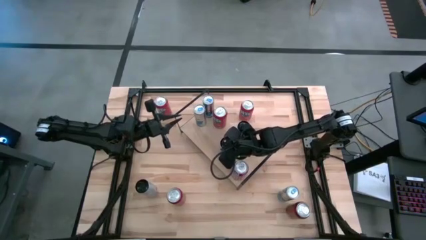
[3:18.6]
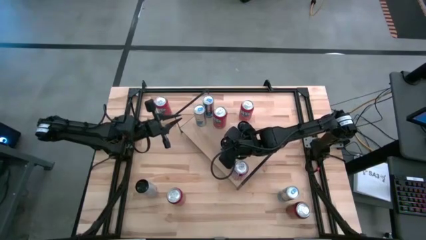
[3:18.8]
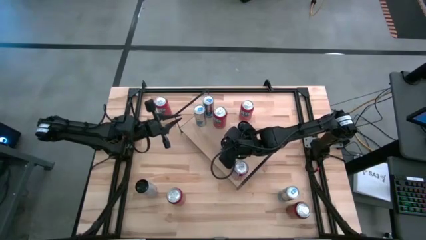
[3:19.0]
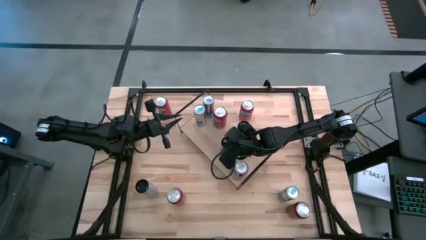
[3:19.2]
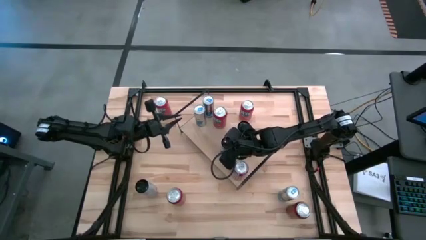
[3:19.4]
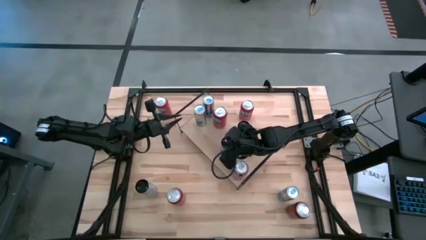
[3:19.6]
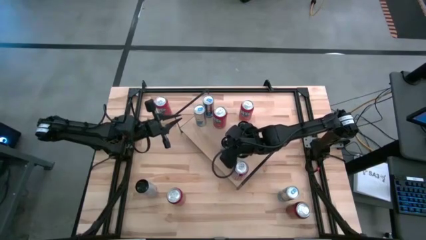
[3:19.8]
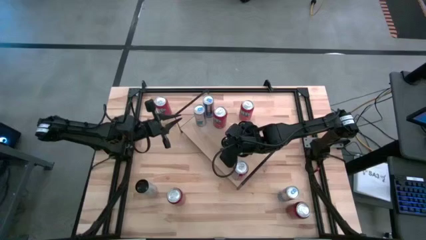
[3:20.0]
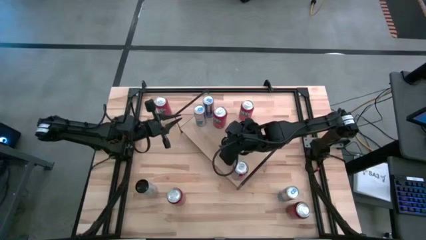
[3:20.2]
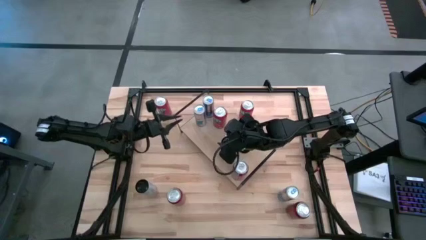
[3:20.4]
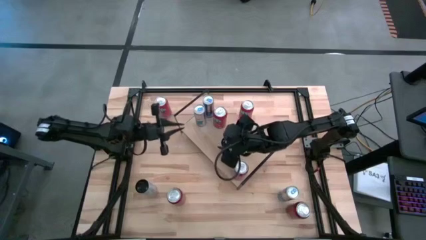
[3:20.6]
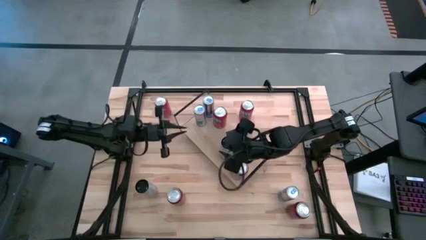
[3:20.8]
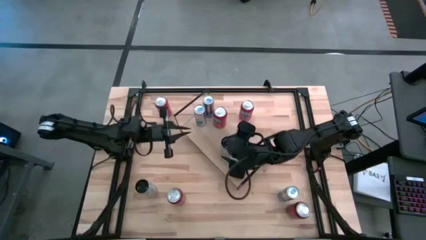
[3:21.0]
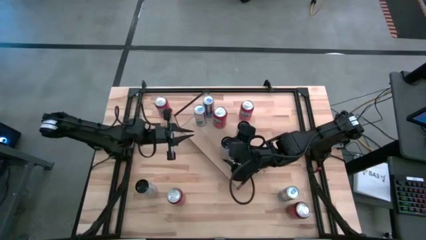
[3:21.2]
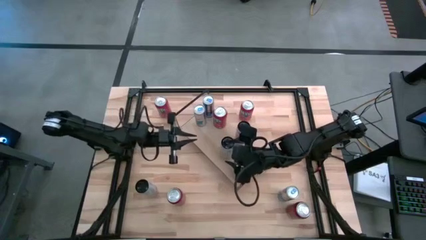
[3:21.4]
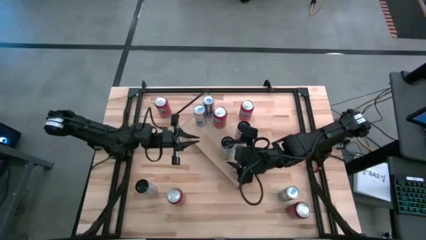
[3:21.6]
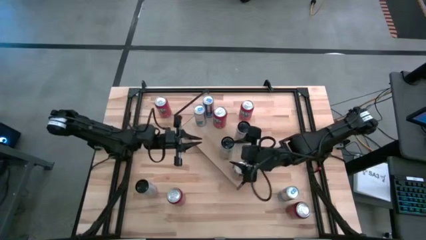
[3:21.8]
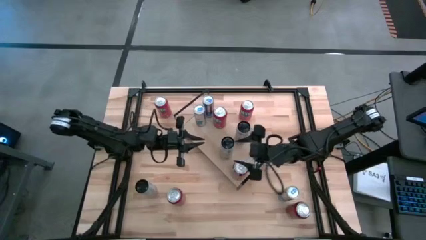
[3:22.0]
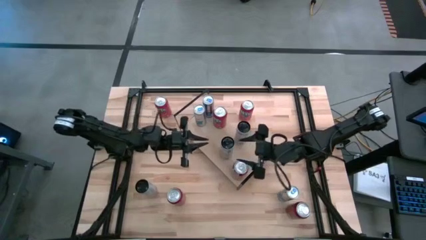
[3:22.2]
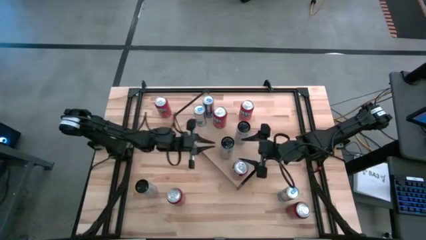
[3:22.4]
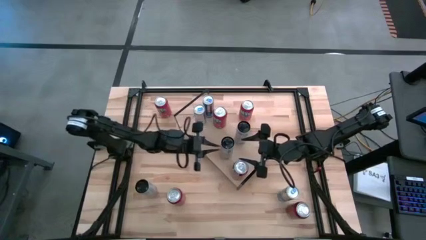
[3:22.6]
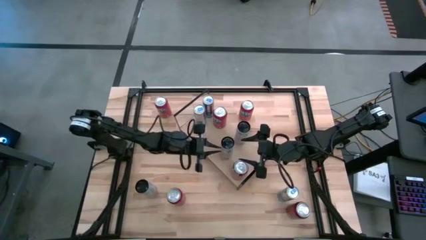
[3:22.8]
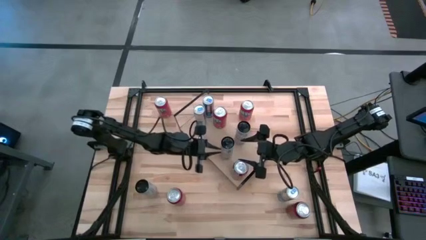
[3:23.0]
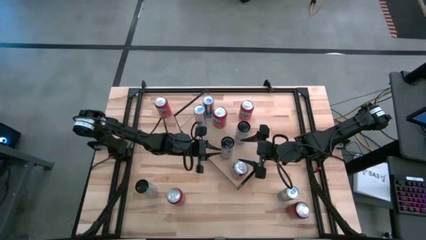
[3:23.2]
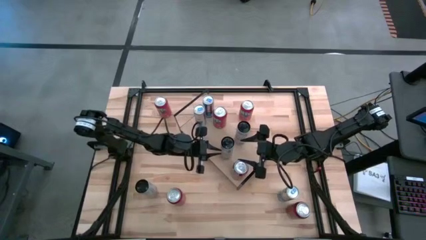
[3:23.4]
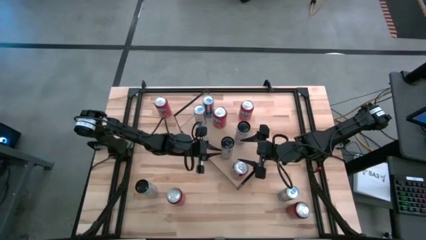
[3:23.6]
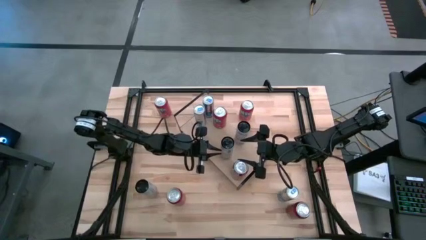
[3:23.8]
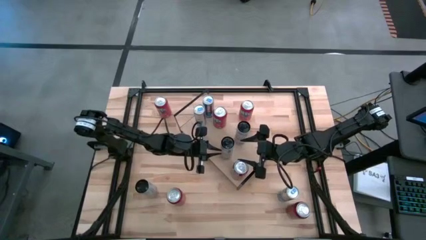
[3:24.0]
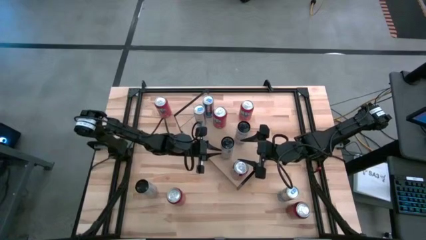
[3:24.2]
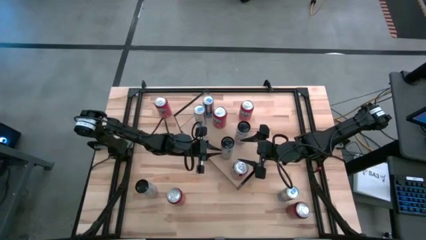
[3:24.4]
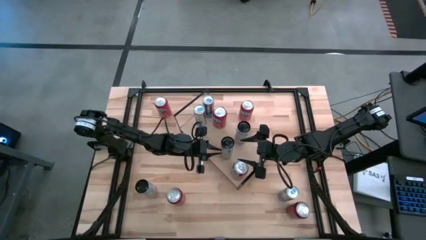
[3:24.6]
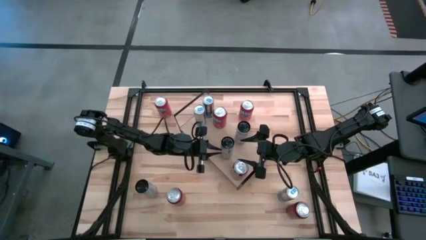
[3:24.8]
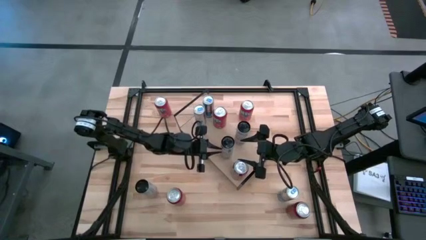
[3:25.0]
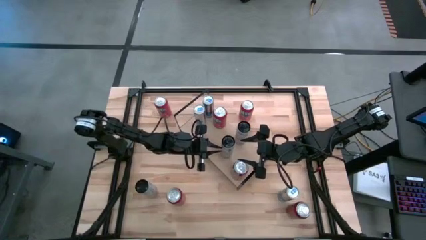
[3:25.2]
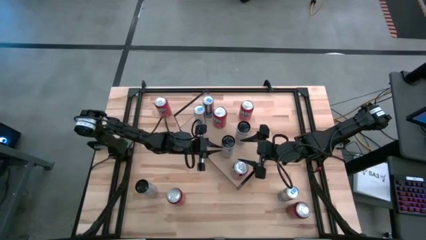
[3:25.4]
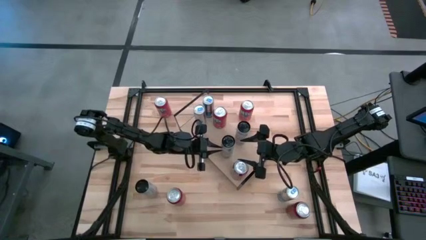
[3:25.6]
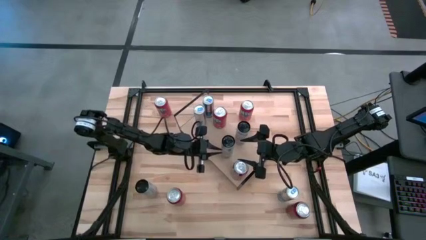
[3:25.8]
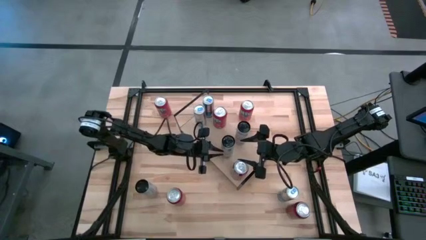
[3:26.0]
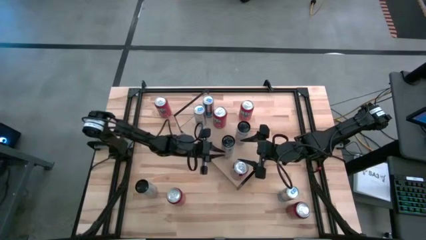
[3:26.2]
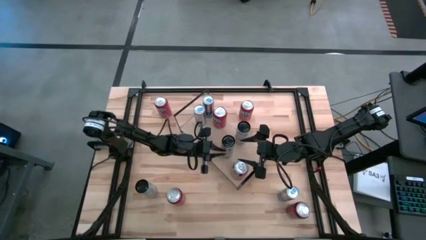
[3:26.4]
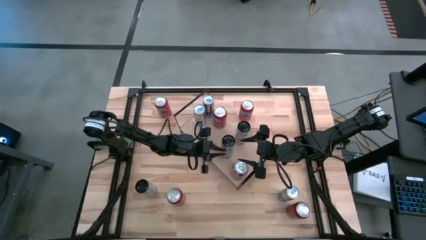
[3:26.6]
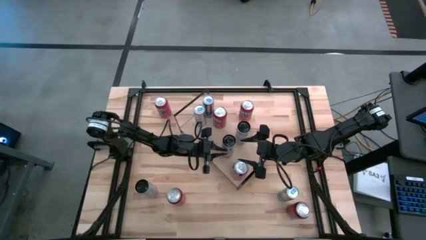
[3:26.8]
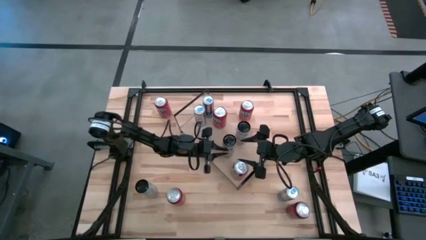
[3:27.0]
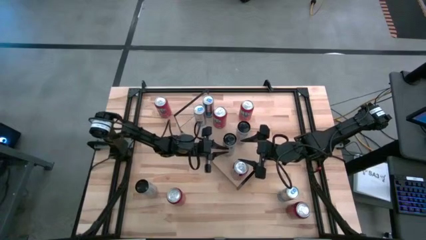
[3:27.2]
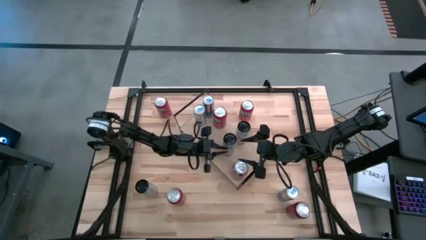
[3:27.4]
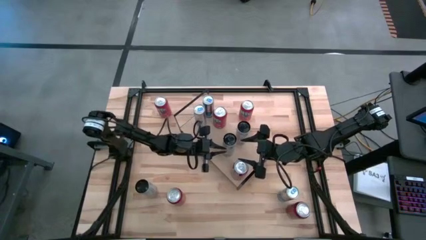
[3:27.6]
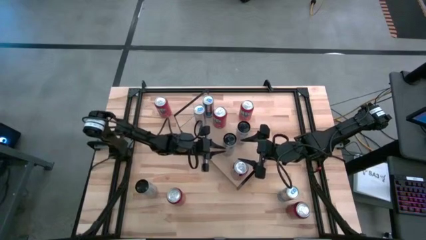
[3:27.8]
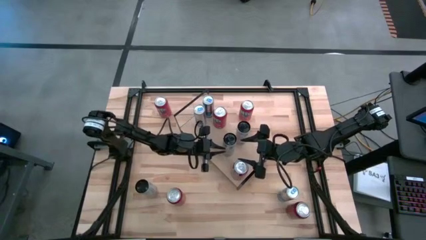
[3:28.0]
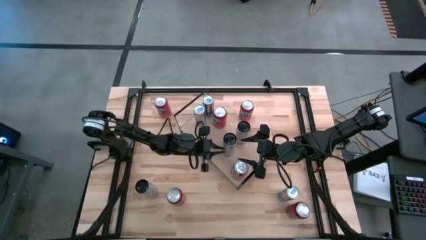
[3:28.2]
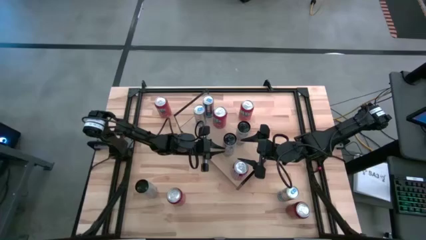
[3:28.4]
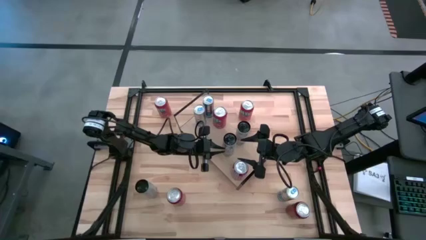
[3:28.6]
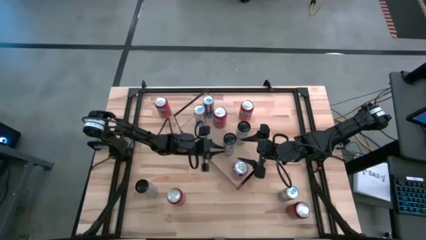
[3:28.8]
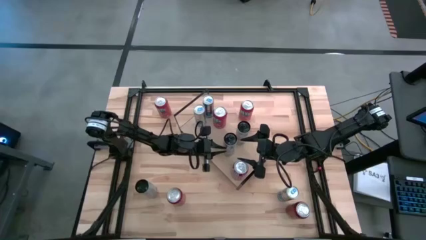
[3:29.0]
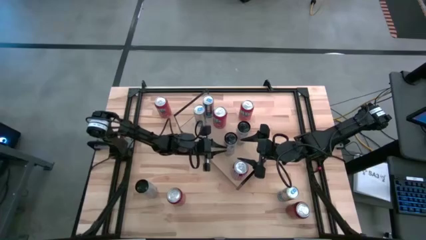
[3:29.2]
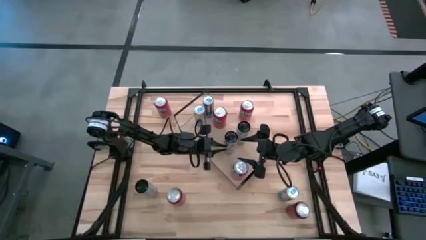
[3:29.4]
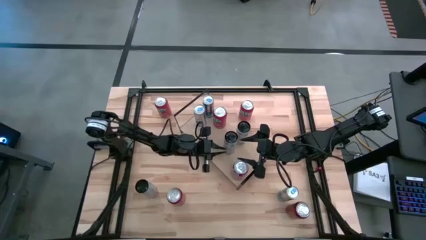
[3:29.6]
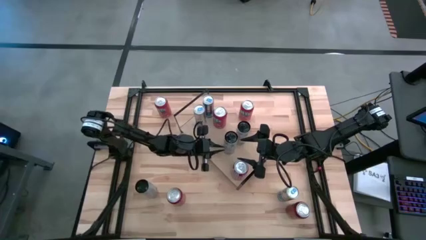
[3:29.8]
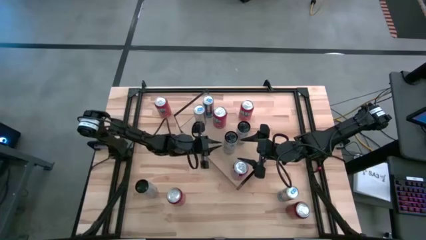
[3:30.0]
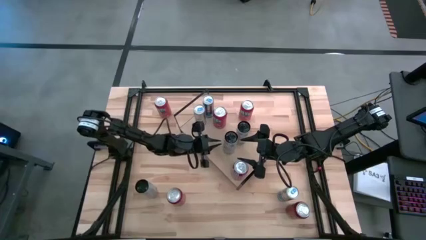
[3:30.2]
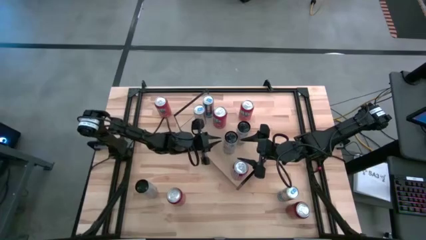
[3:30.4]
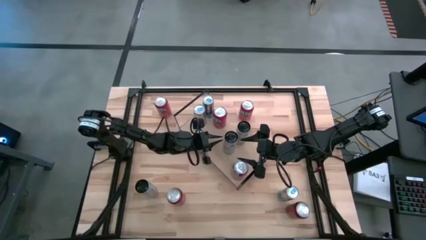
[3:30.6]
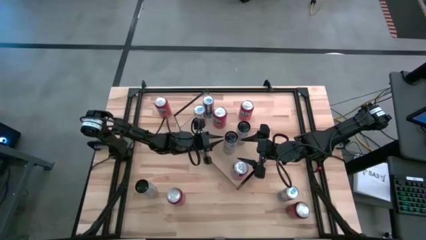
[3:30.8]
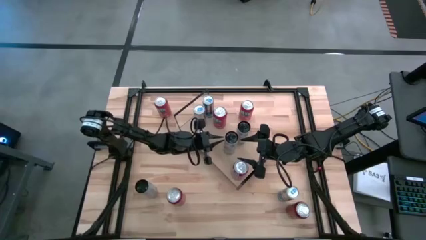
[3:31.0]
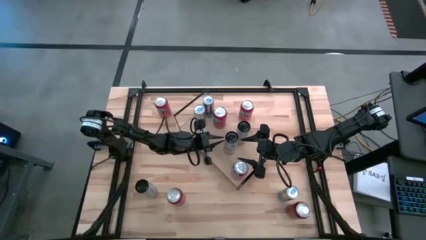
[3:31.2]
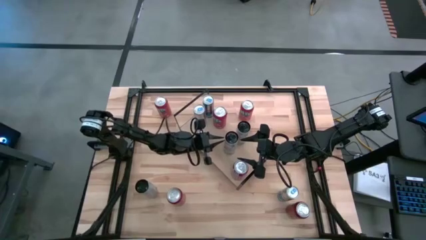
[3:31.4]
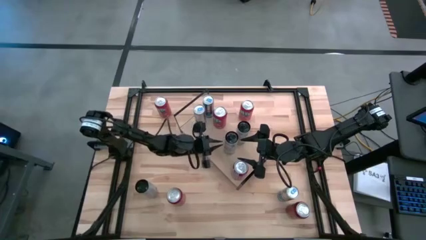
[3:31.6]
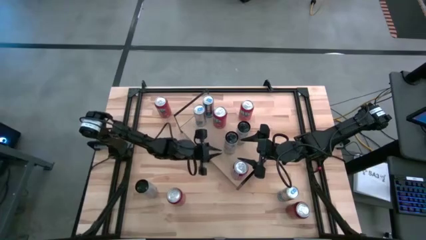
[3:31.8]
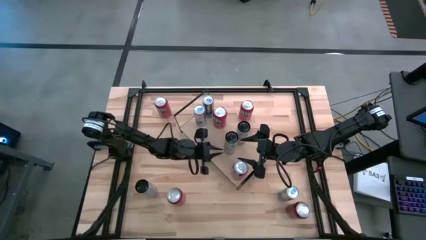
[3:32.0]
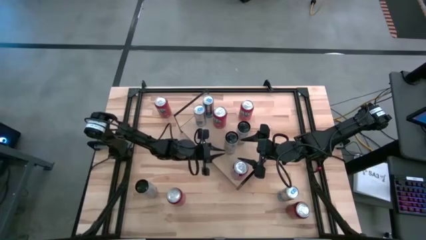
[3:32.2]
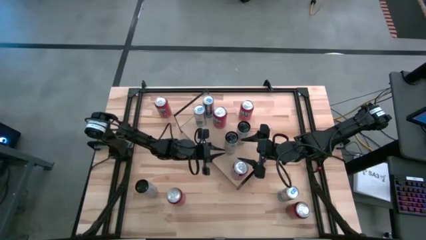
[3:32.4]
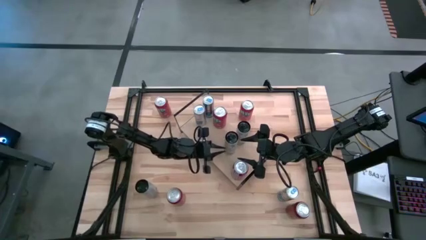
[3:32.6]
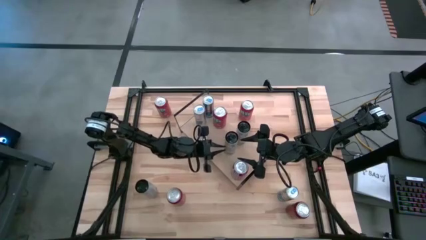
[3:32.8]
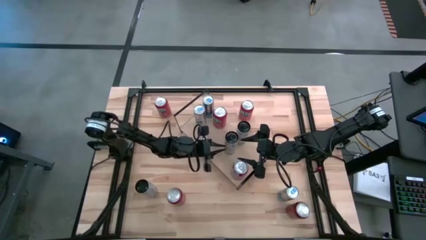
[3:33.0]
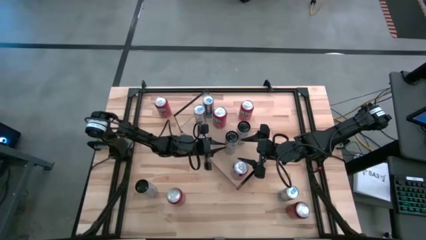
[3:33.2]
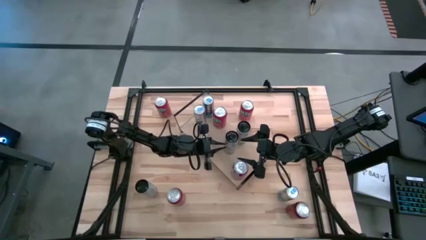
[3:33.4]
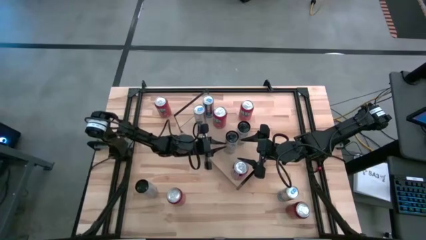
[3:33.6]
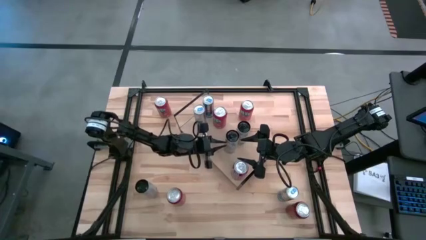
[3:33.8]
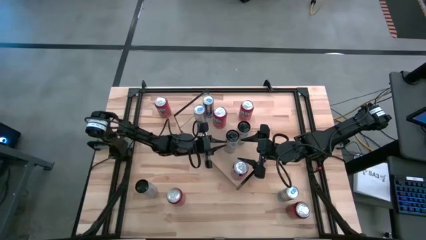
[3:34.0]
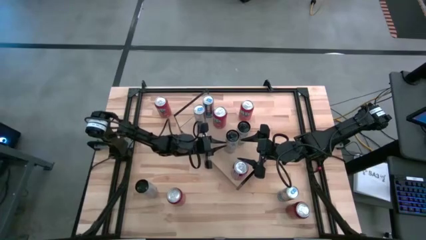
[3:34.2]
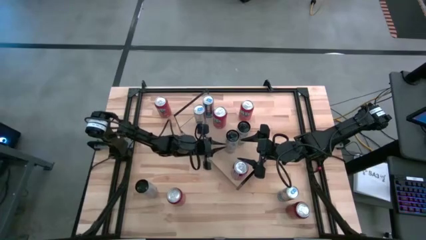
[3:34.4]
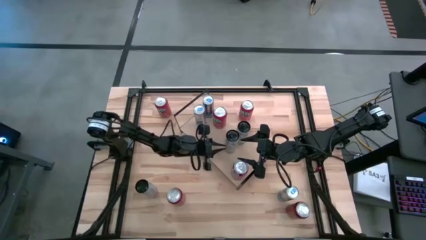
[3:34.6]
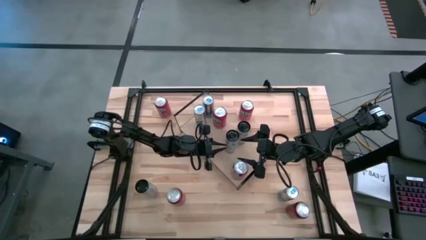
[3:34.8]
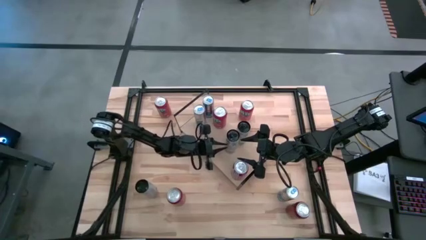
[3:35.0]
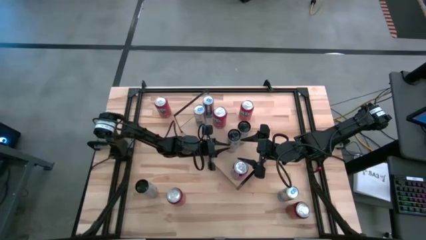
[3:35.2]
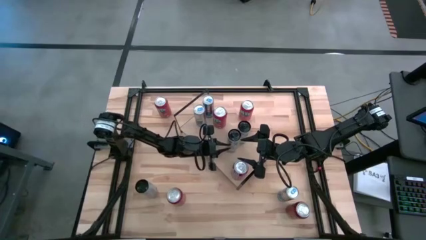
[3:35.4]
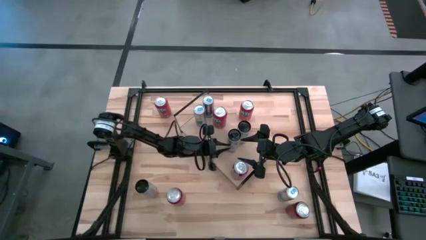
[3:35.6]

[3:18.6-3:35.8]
Task: Place canned beverage on shelf
Put the top pink soda can on the shelf aligned with the pink soda can on the shelf
